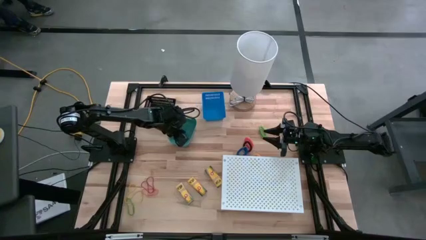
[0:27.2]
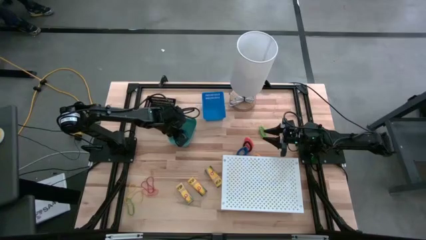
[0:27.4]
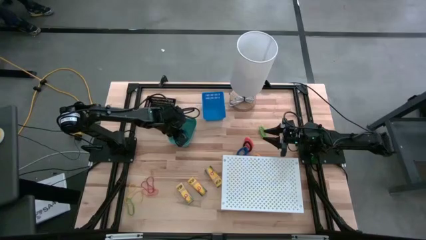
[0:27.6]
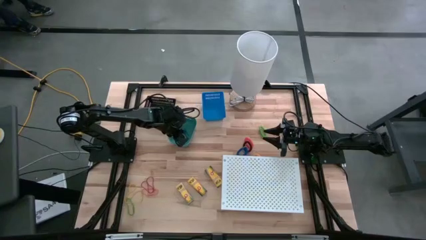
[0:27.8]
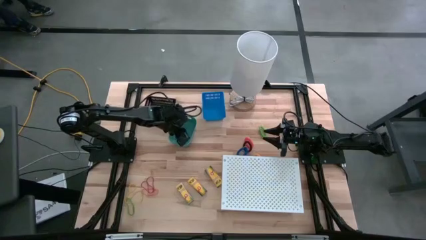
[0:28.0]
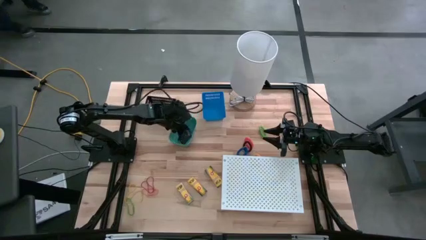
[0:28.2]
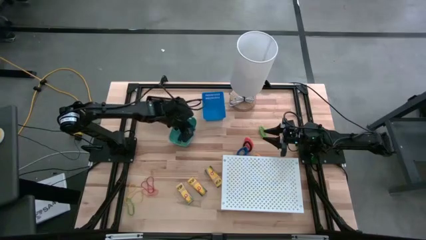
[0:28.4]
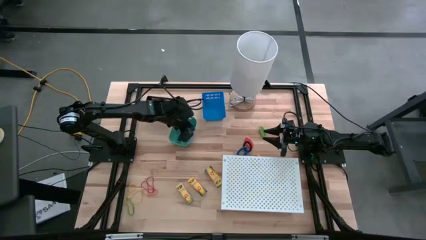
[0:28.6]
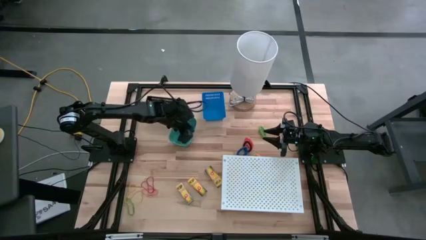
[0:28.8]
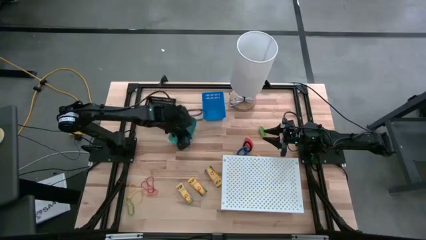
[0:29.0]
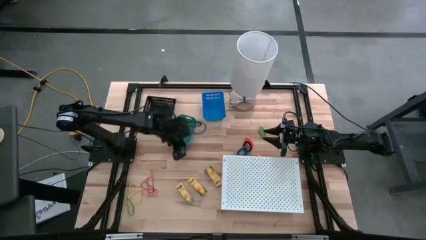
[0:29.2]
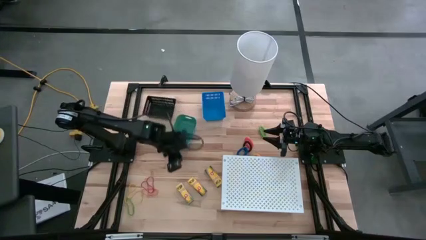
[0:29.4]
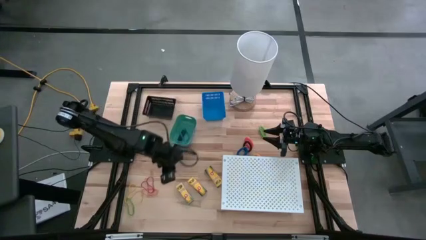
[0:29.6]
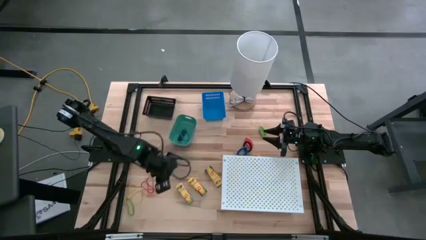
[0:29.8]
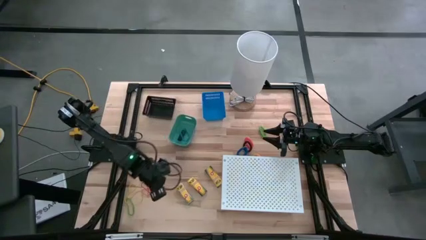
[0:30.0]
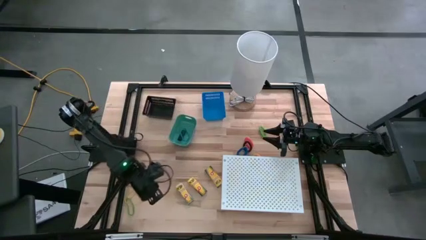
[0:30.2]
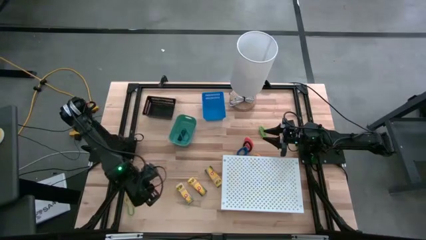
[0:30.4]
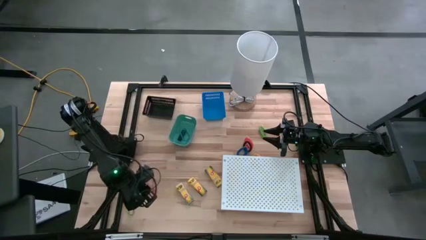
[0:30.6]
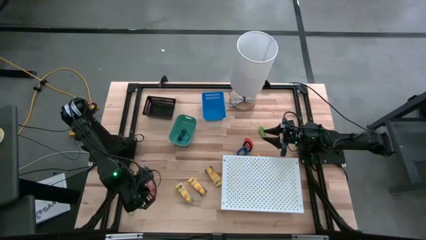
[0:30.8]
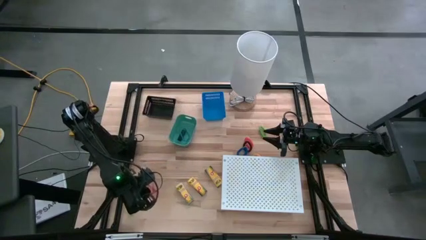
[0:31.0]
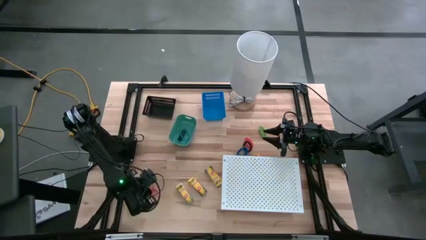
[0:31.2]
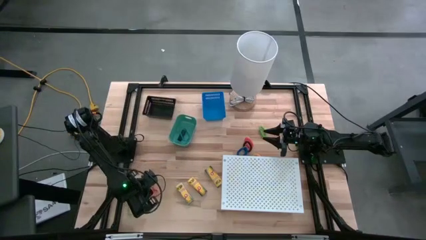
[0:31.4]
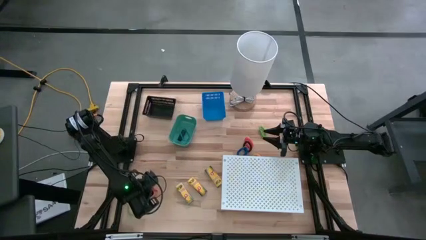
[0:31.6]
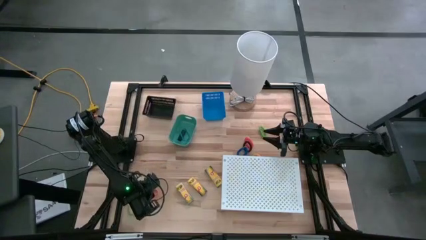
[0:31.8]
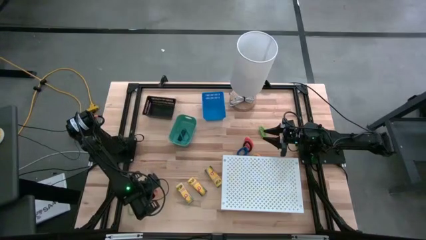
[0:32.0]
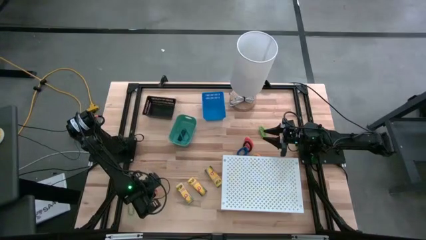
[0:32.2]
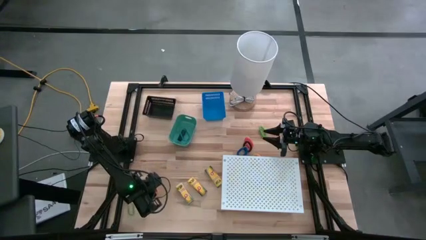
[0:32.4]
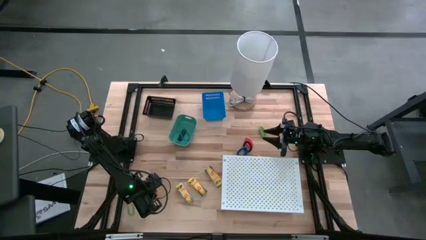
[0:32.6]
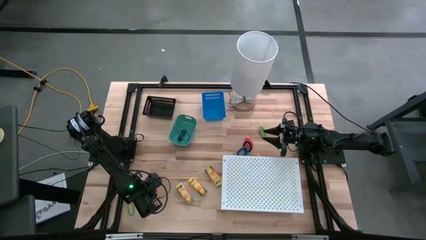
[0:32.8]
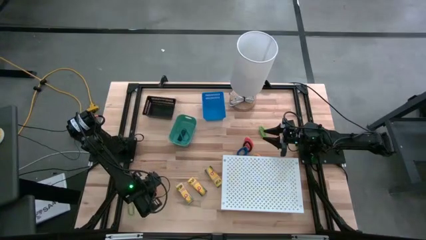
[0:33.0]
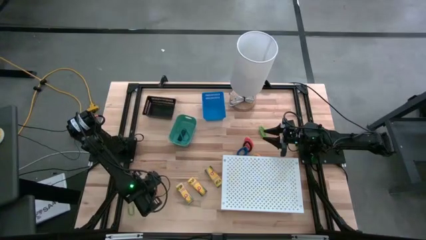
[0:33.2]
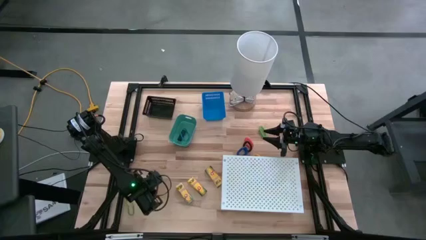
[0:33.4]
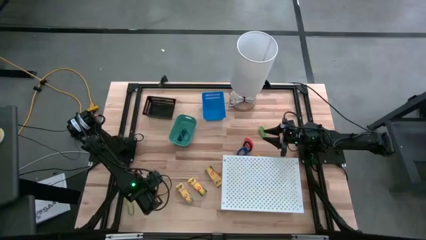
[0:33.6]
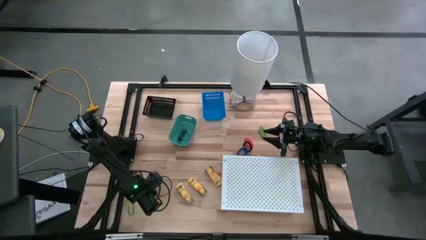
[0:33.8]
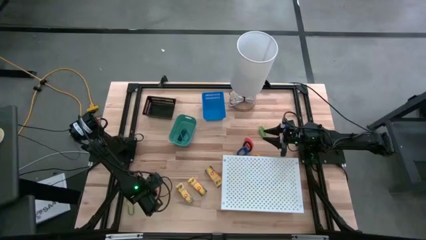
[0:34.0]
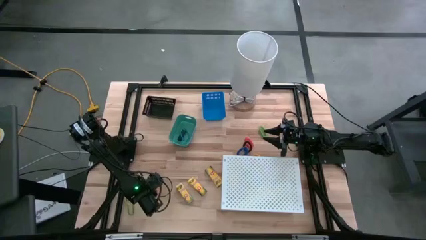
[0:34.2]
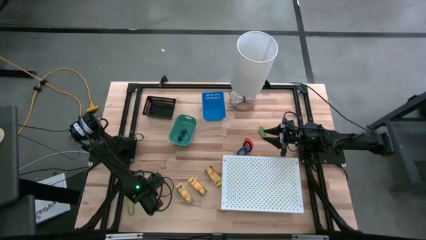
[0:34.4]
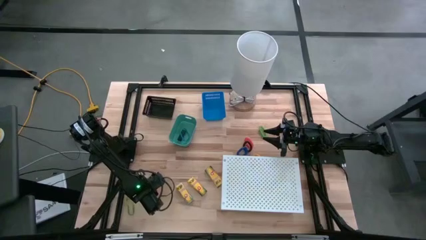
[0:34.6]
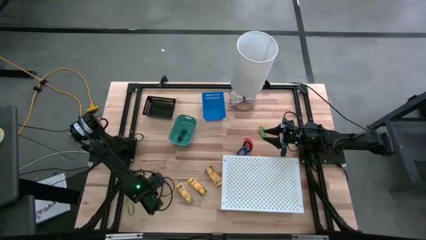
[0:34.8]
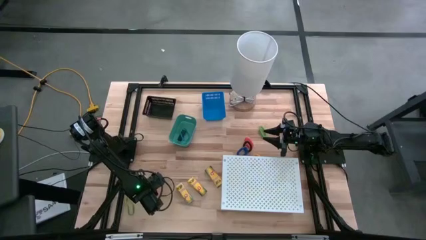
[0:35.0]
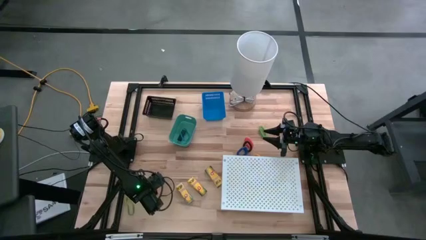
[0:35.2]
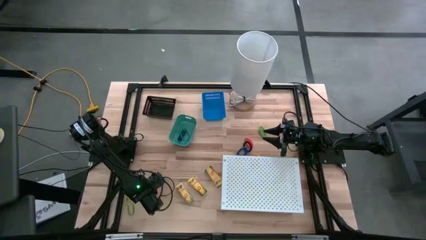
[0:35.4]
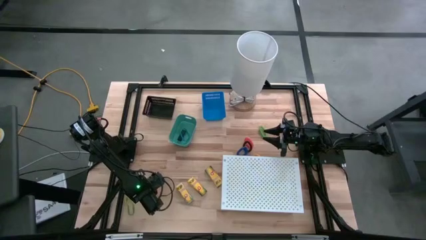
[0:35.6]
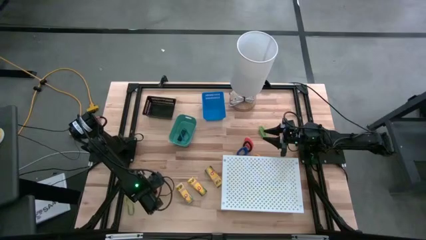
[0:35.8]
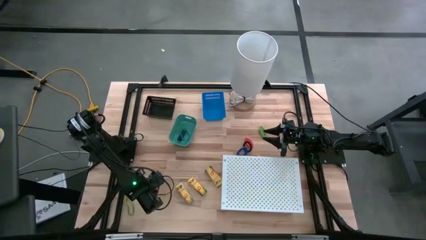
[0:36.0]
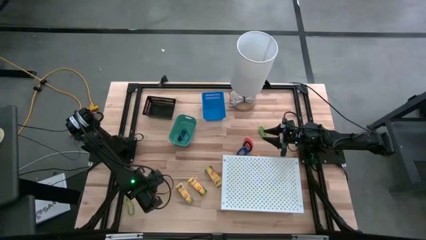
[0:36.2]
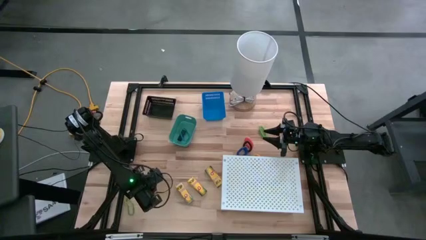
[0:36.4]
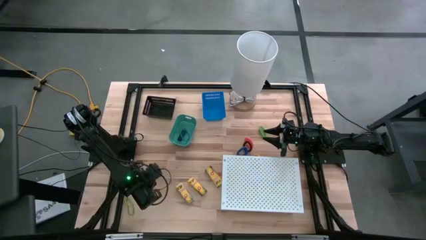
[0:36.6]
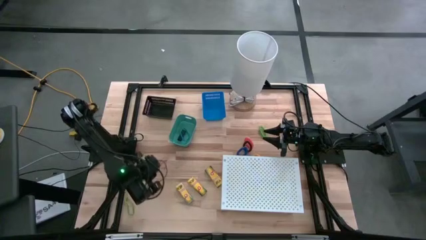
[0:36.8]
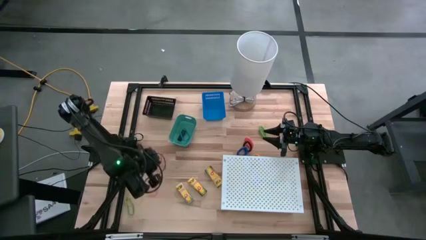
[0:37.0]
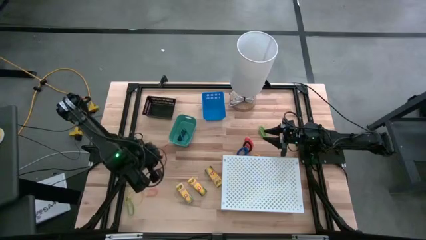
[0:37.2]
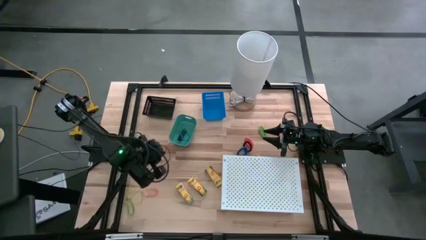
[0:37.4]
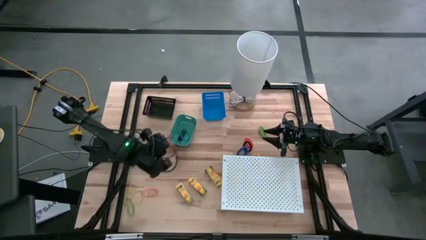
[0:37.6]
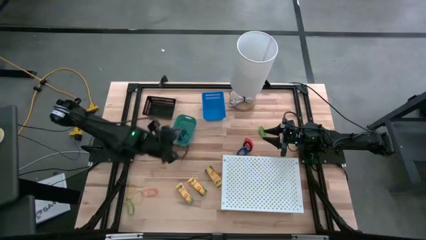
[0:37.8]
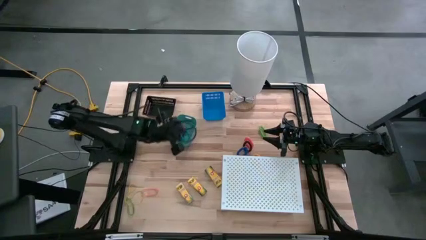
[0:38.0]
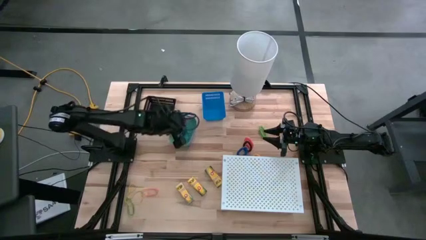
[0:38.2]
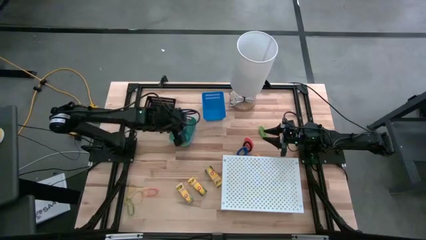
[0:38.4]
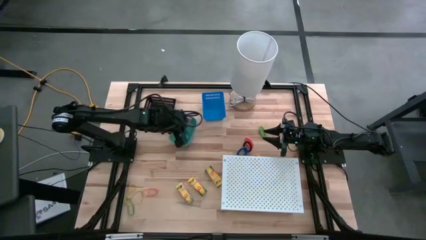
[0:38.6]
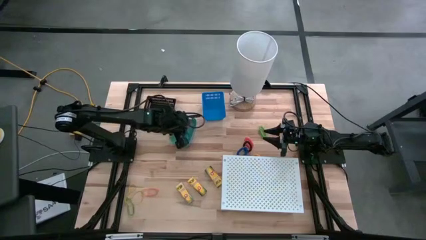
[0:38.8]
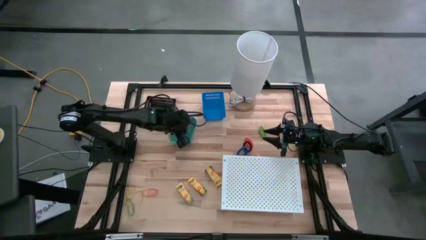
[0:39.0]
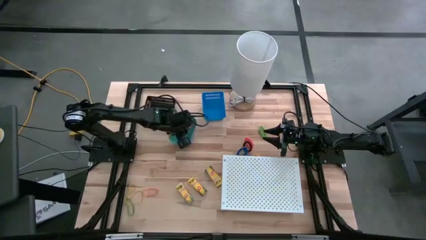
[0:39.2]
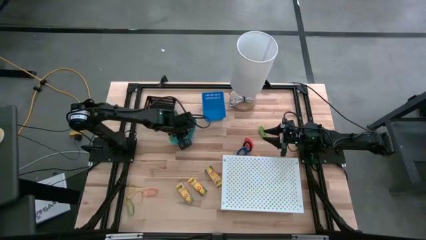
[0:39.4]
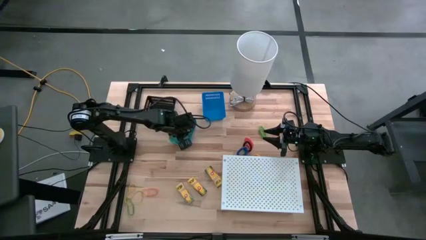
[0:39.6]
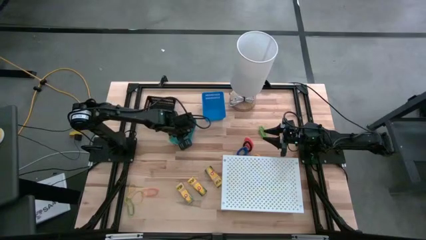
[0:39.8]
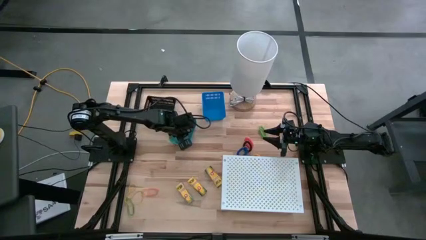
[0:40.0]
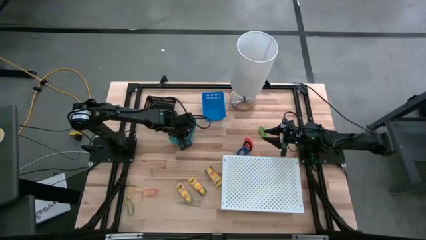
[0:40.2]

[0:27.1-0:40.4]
Task: Pick & Place Office Desk Supplies
Put the red rubber band into the green bin
